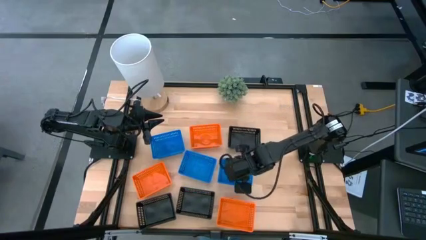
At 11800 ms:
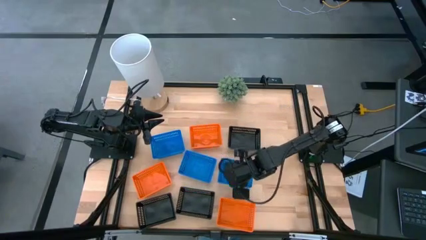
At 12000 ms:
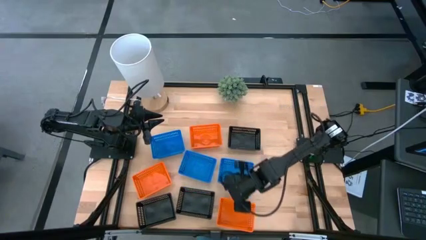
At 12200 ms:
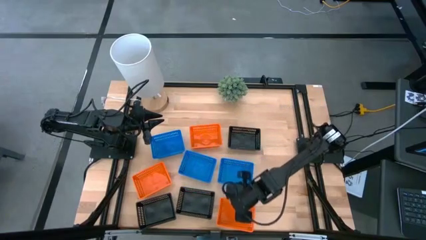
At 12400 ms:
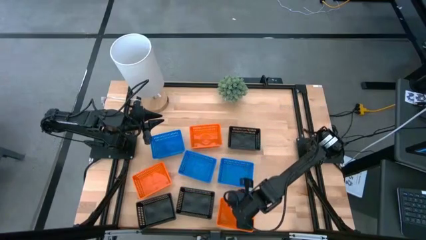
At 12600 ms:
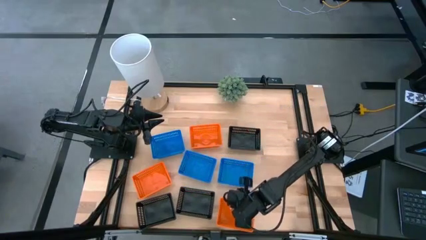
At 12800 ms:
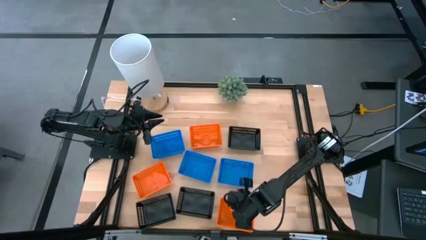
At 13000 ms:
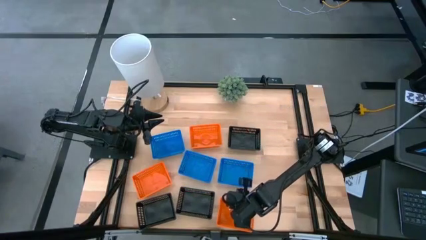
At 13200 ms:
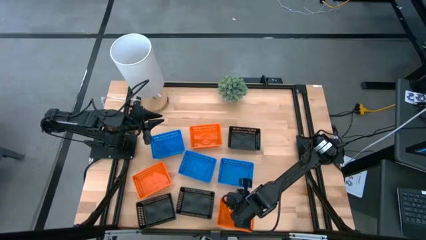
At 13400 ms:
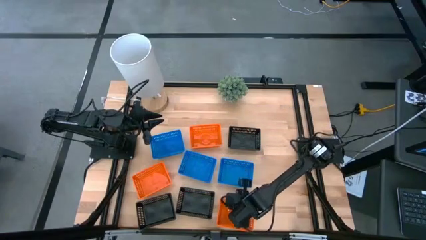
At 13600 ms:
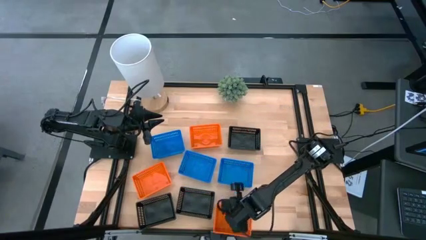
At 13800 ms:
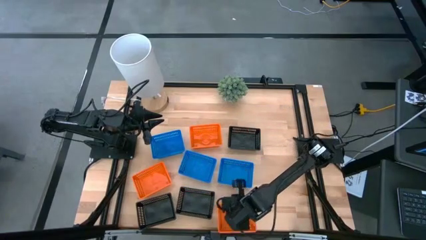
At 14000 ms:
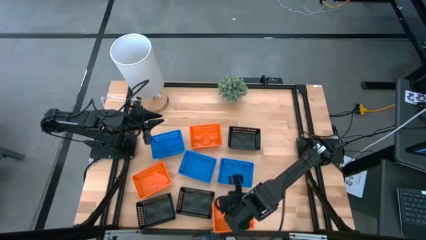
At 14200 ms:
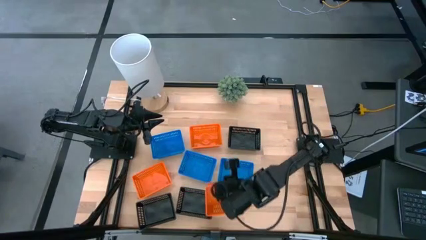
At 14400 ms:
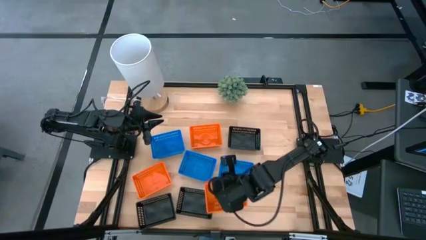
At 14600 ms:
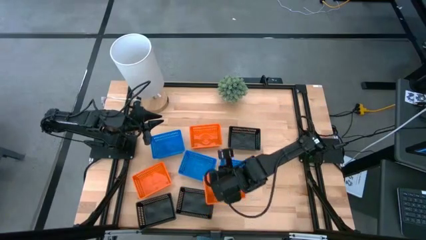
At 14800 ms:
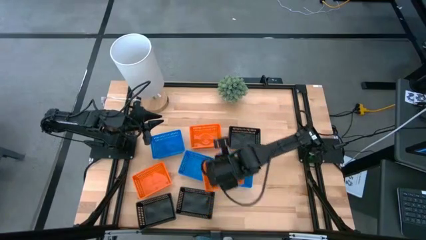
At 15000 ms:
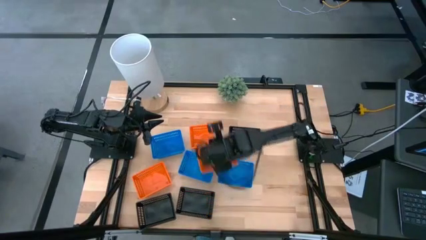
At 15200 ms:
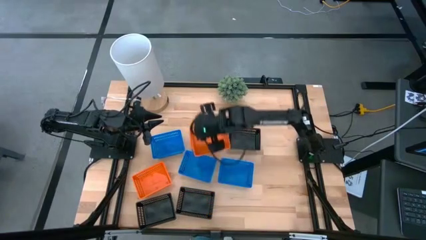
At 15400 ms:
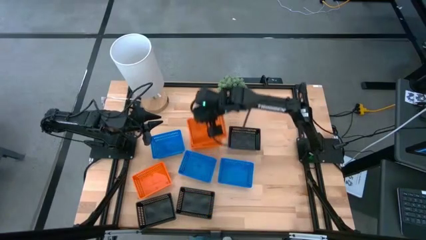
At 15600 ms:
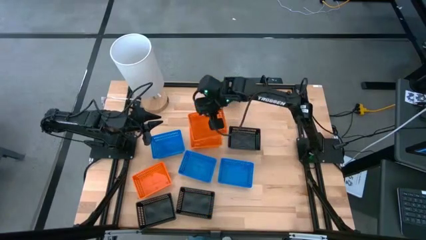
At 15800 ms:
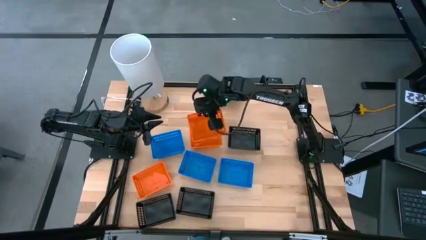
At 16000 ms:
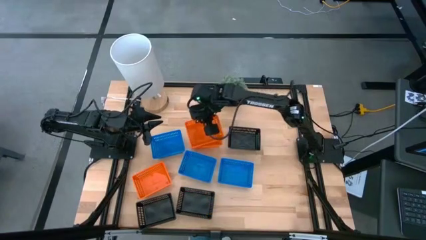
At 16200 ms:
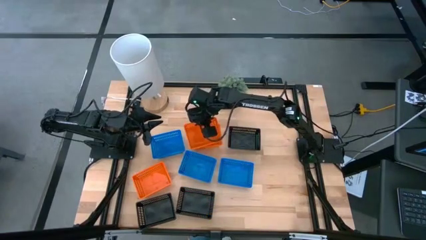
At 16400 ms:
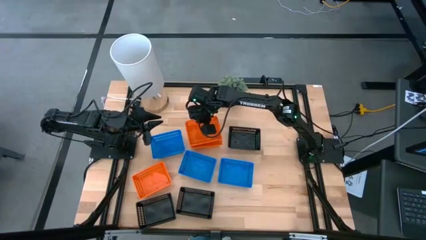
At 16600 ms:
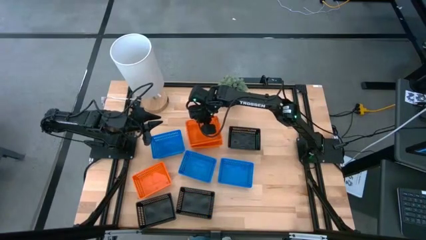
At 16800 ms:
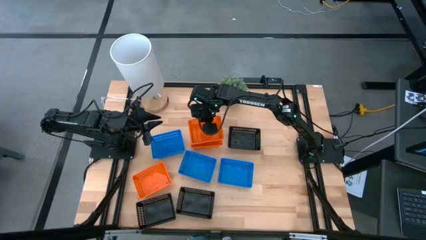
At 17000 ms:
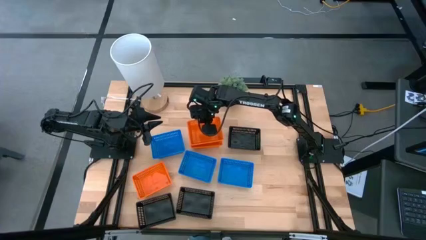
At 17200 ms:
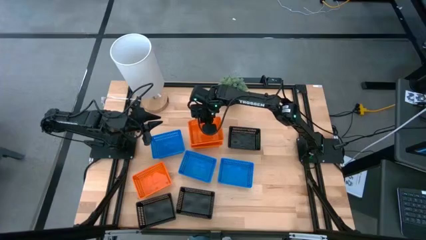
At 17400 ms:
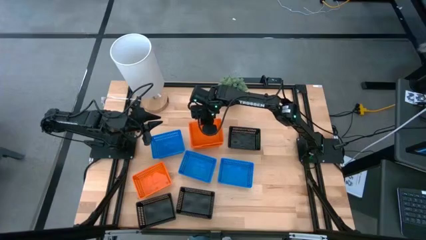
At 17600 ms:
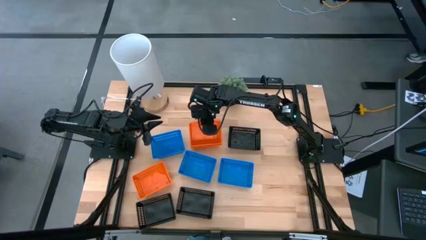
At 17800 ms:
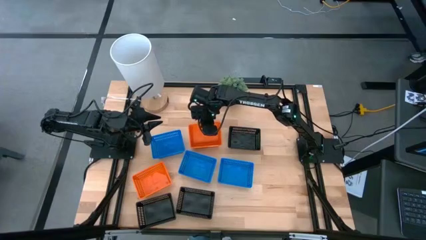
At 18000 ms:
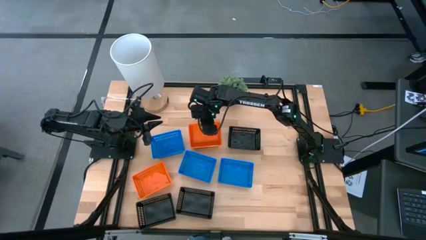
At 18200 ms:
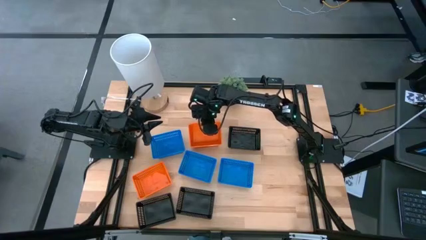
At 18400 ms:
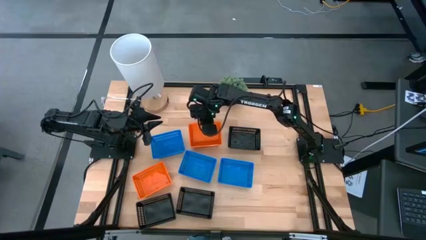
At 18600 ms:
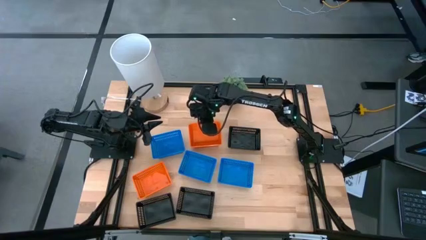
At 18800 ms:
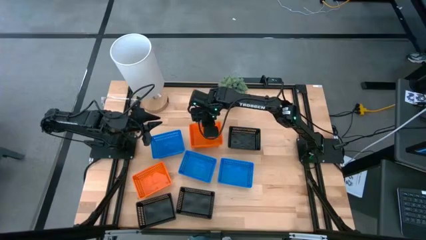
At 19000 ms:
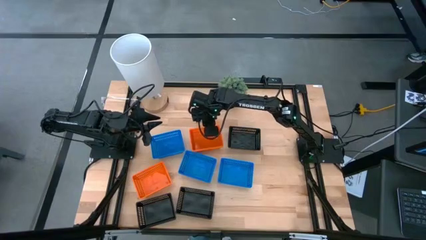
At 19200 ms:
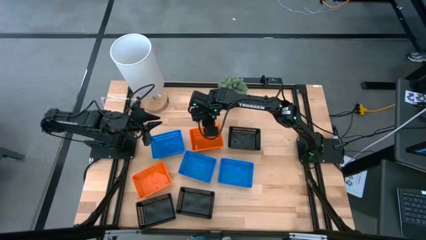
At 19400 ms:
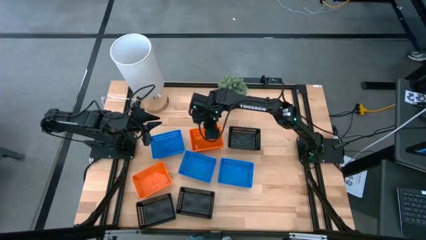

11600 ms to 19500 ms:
Stack the bottom right orange bin on the top of the top orange bin

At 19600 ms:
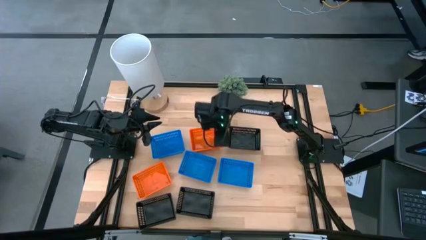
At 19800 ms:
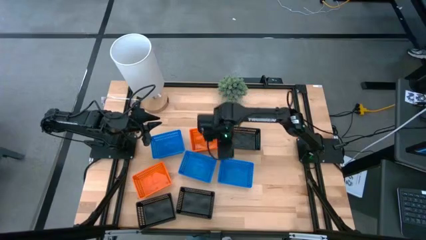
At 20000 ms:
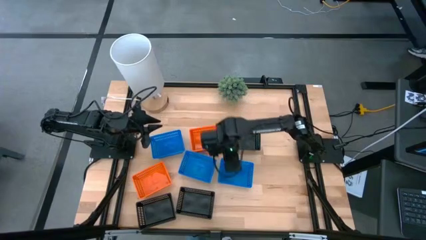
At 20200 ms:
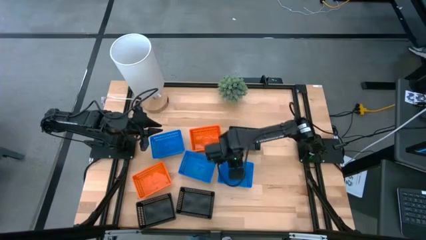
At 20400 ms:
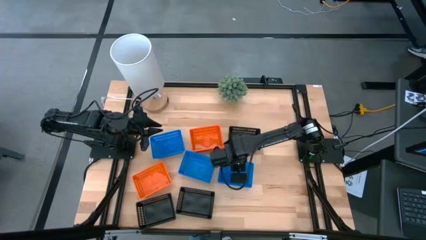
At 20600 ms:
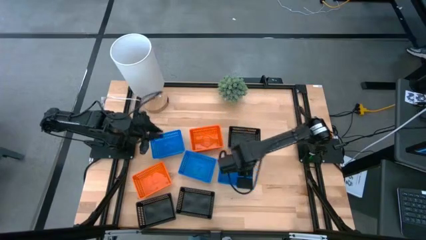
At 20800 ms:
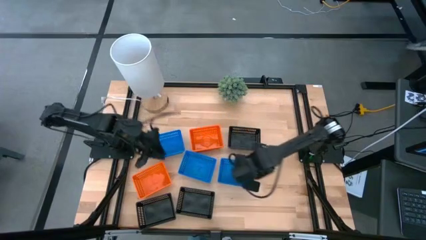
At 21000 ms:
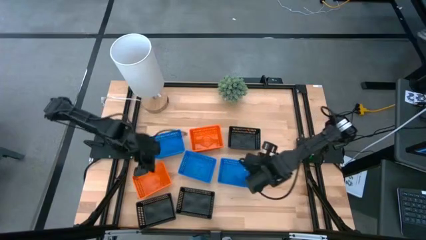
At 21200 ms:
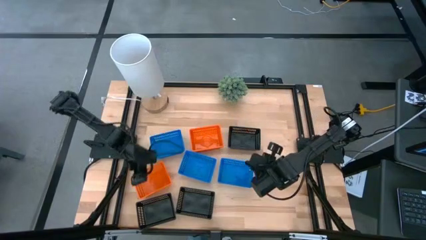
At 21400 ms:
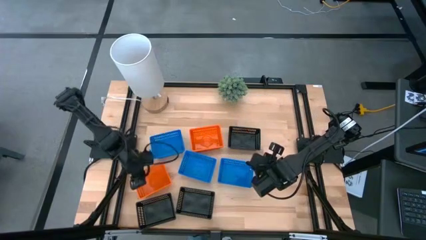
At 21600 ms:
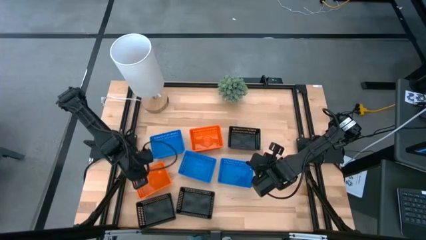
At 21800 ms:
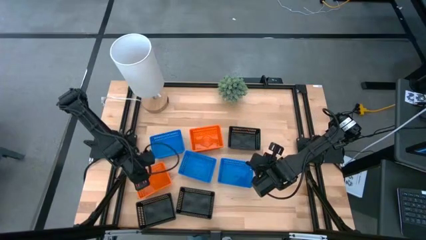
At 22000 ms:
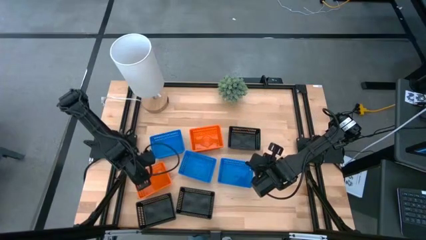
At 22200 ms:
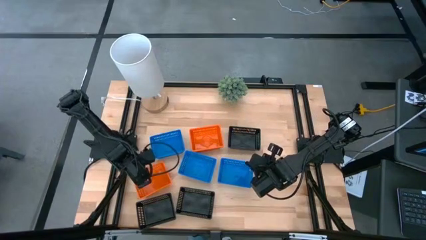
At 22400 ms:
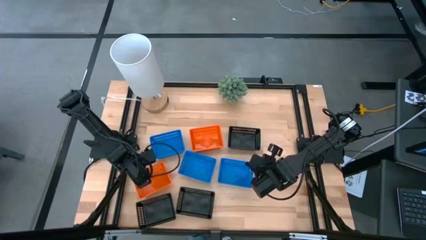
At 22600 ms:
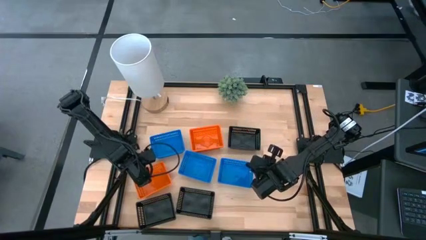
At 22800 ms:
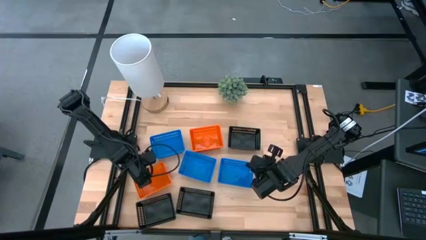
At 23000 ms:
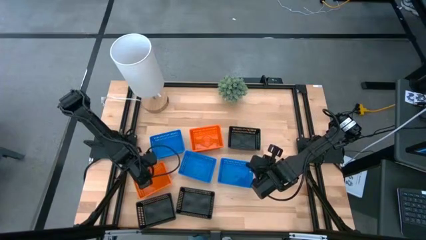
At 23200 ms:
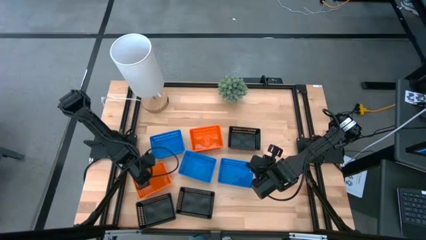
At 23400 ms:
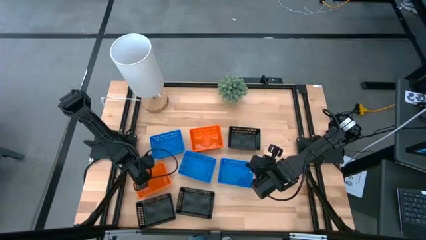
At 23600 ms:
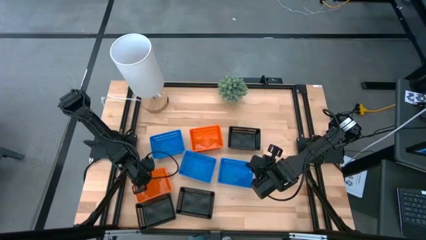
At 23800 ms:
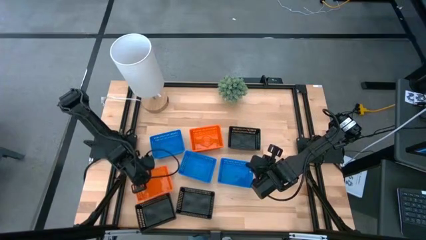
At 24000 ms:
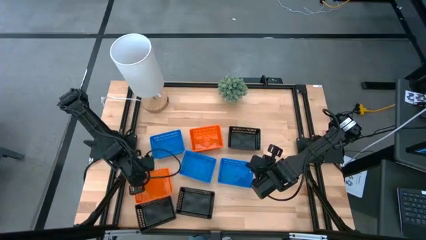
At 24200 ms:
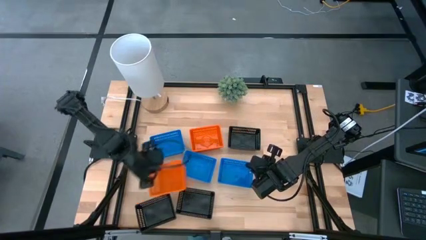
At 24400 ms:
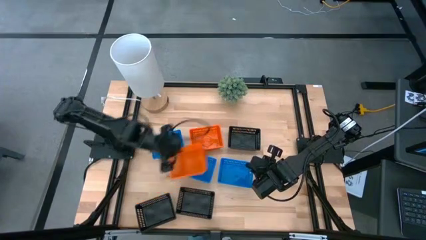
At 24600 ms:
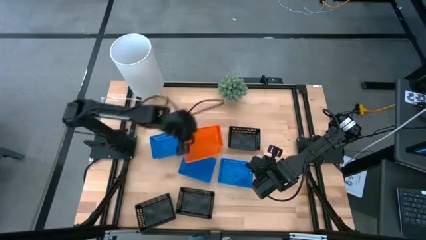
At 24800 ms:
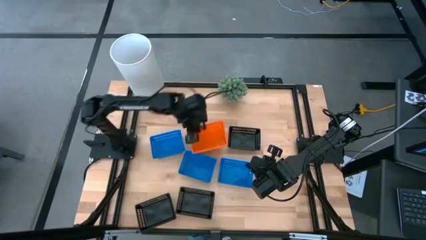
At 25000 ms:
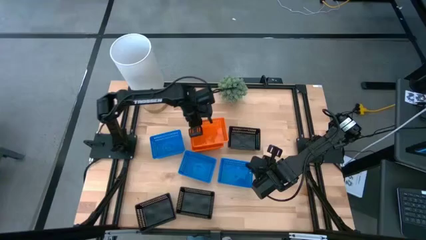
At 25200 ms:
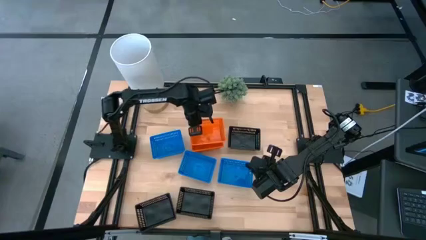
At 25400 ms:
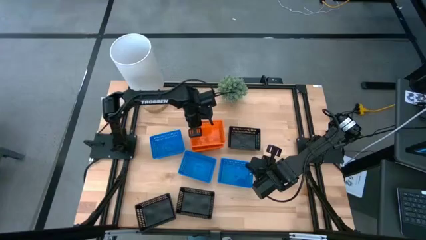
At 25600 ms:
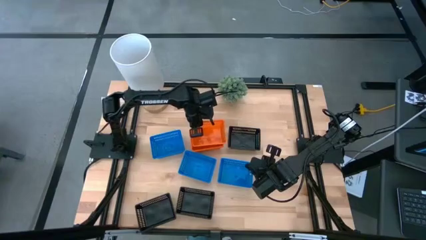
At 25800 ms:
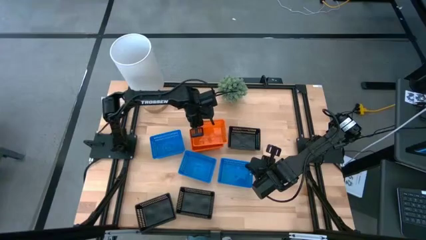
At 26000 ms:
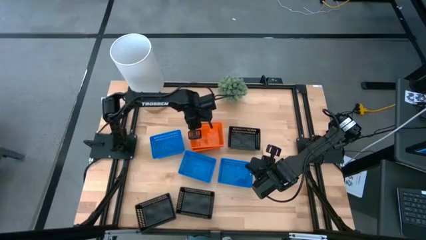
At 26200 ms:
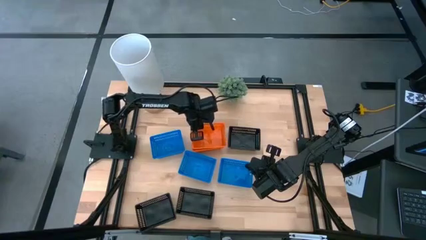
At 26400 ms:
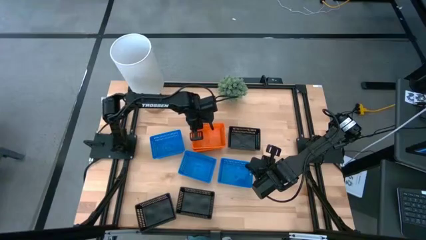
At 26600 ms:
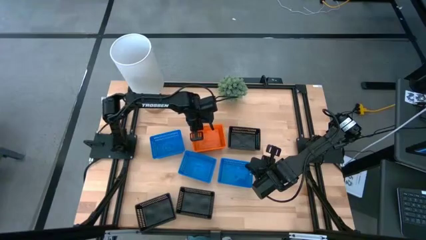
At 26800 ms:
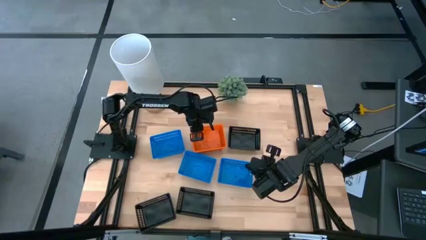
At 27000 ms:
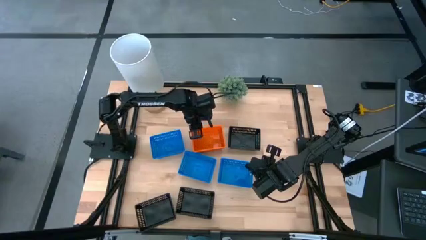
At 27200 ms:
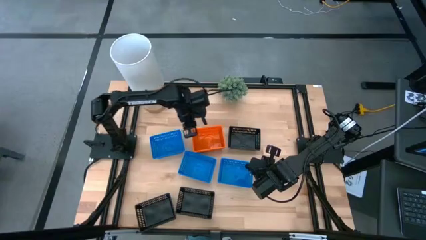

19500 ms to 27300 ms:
Stack the bottom orange bin on the top of the top orange bins
